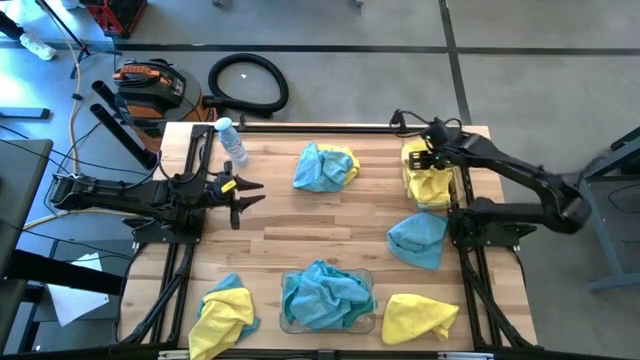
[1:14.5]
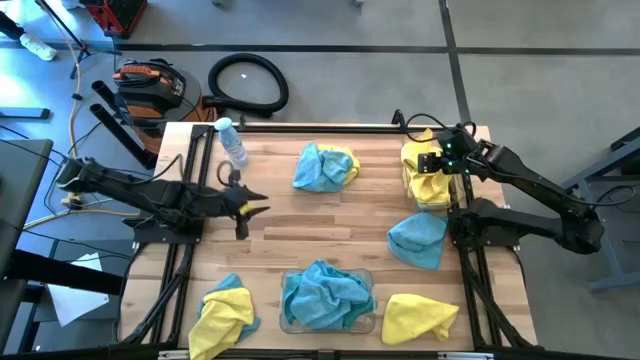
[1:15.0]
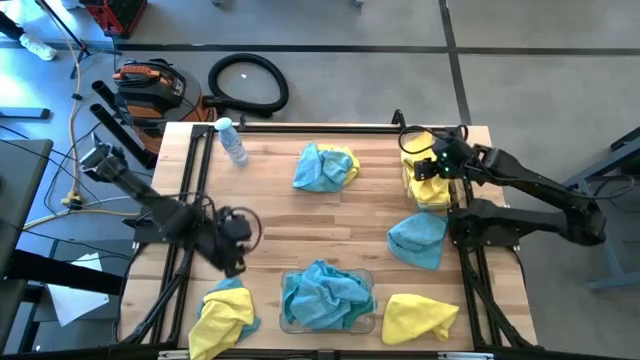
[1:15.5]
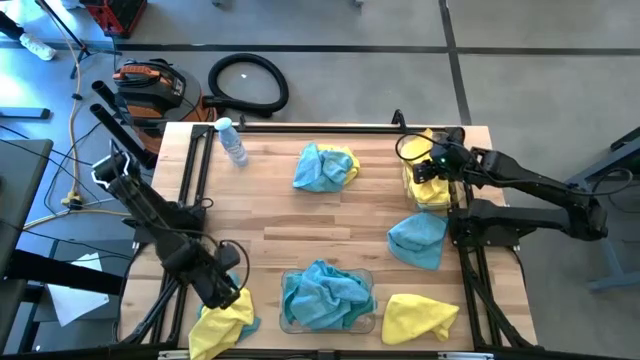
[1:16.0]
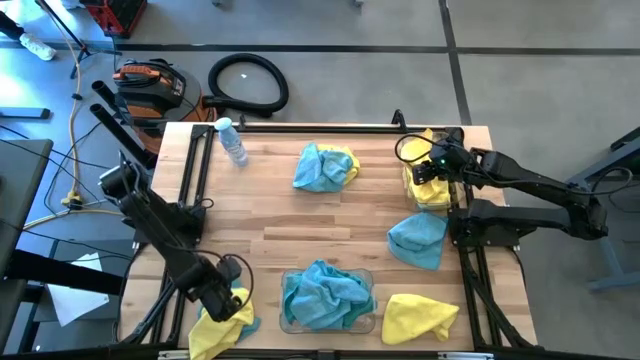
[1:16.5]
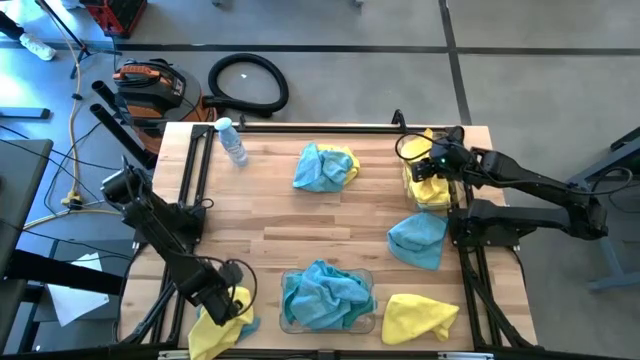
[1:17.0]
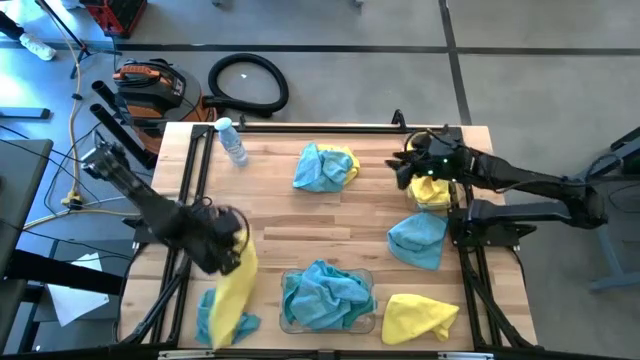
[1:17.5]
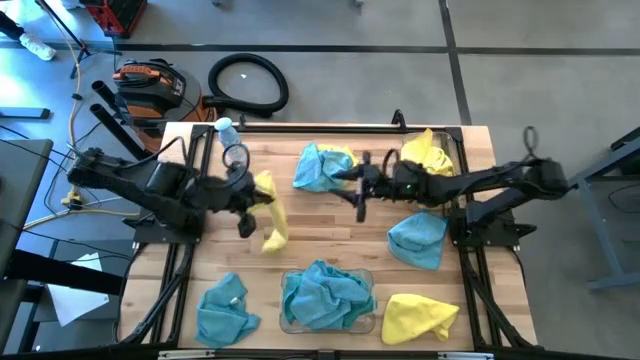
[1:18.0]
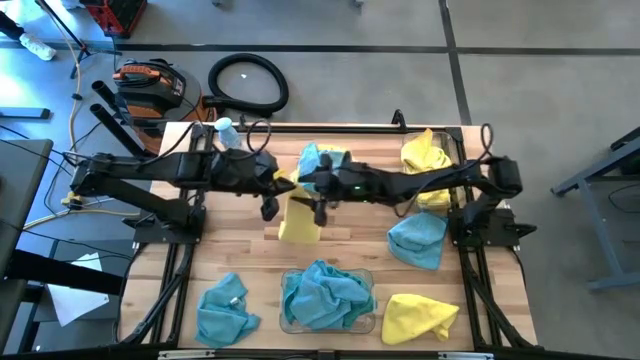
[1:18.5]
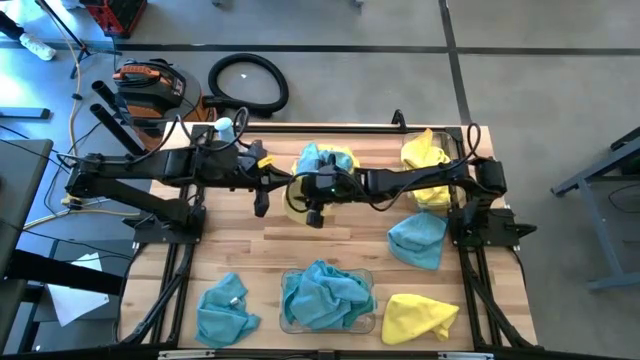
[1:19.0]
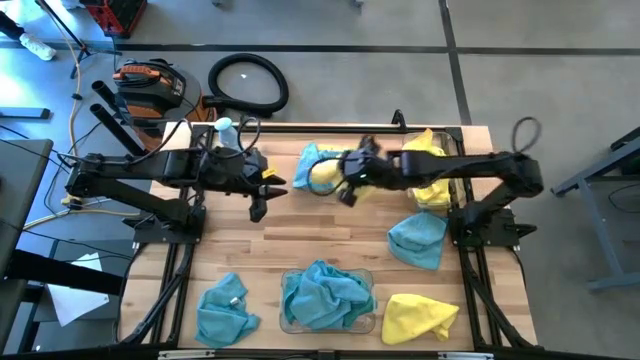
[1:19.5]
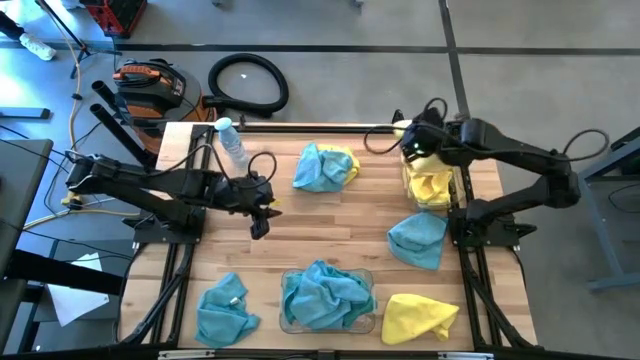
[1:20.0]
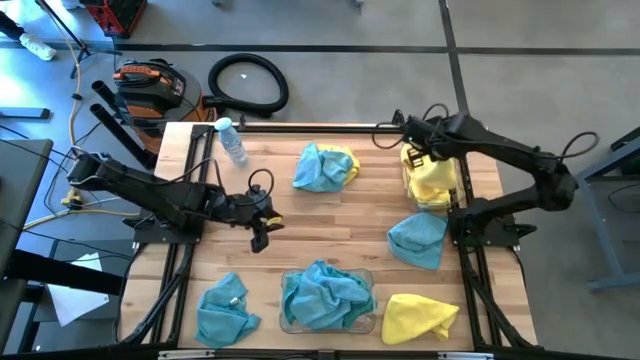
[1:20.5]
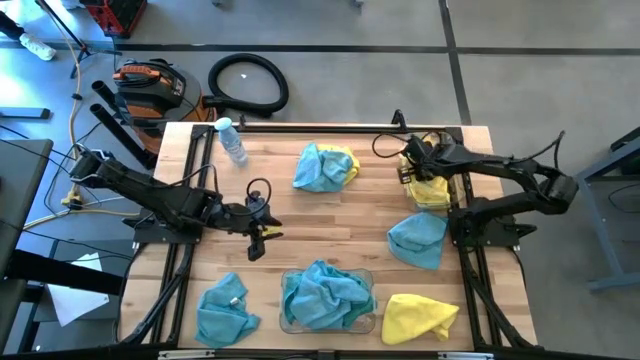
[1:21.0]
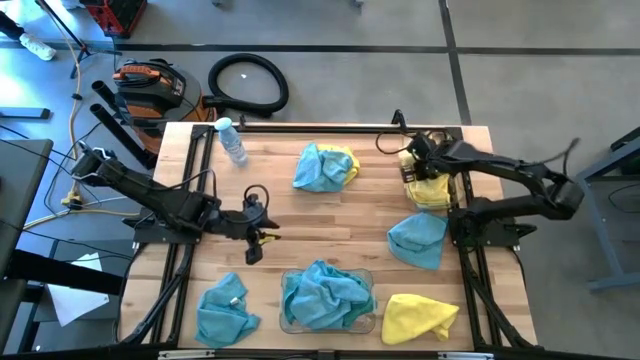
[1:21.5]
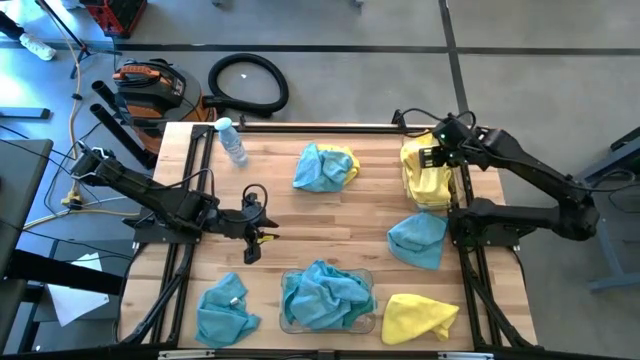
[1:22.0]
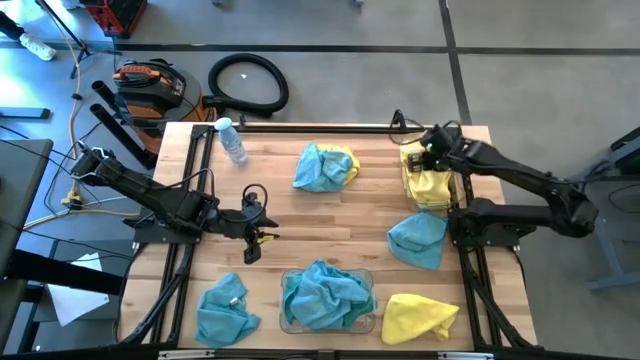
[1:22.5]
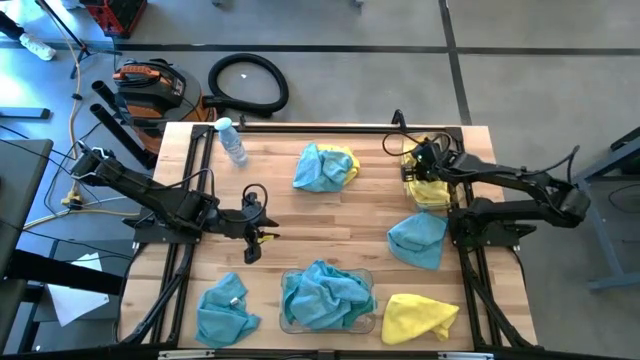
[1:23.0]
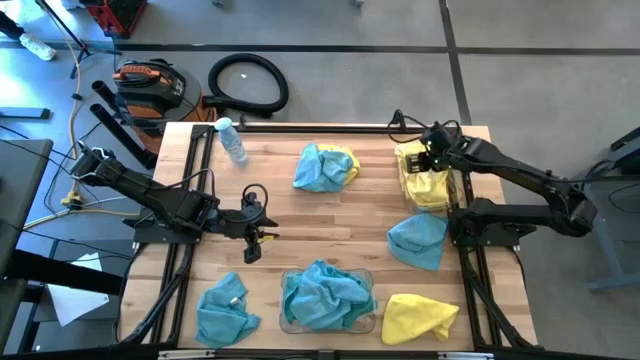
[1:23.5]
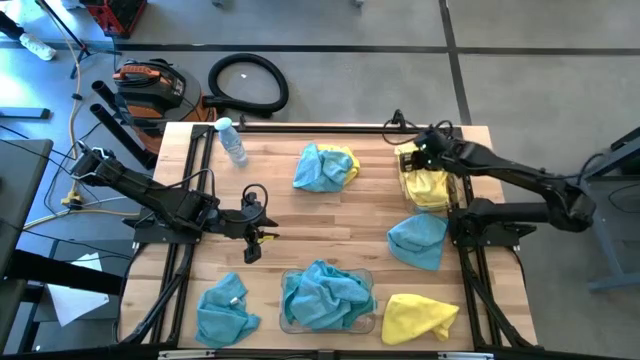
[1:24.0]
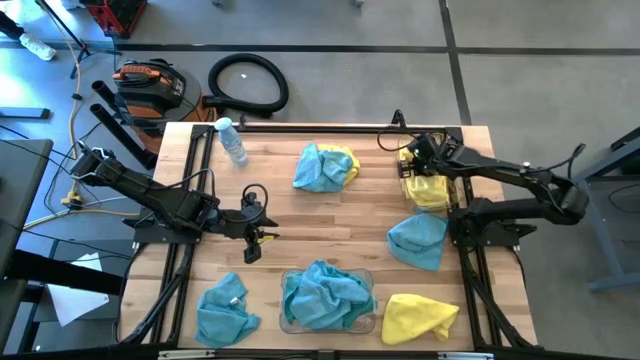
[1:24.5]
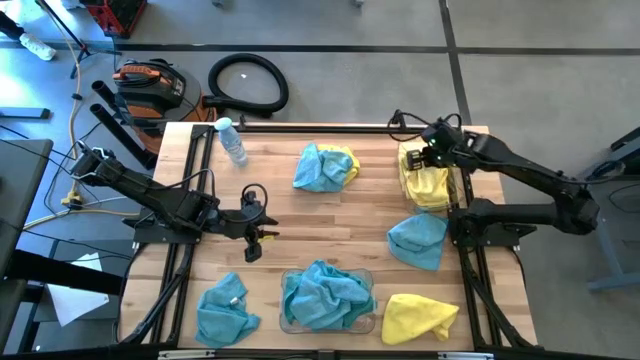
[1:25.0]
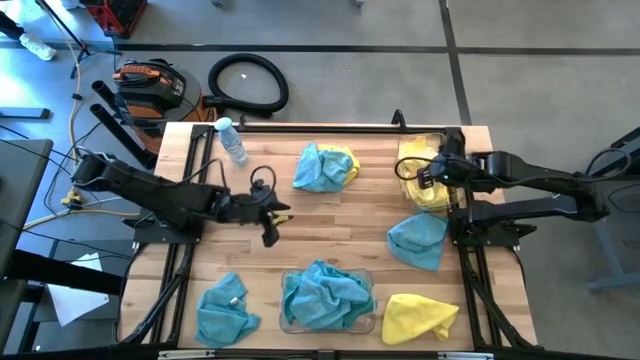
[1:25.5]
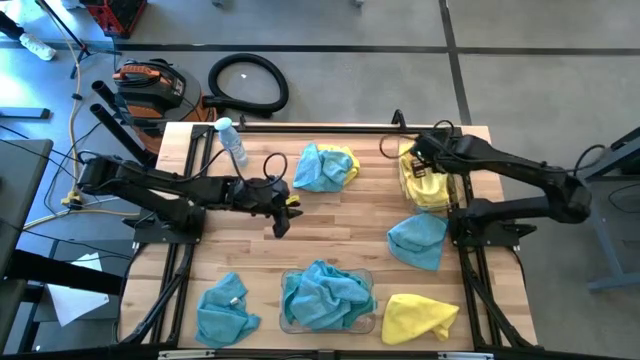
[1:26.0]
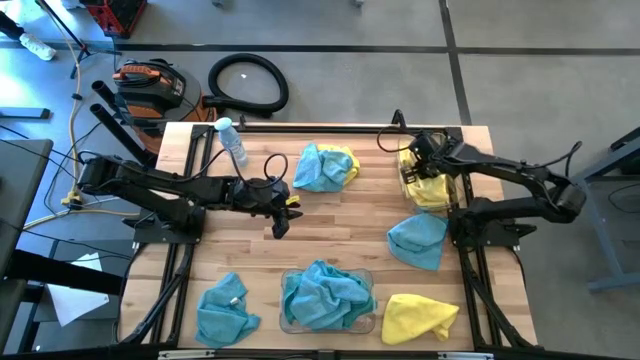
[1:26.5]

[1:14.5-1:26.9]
Task: Sort microfiber towel by color & place in baskets
Put the yellow microfiber towel into the top transparent bin

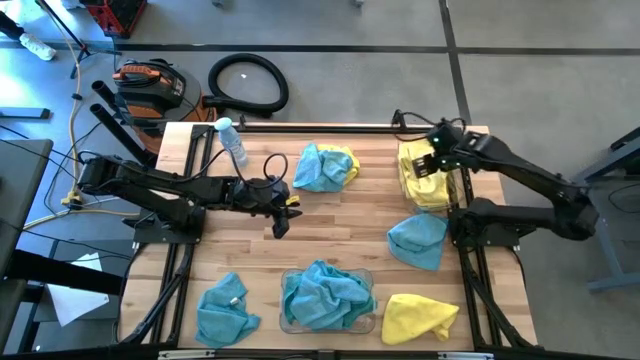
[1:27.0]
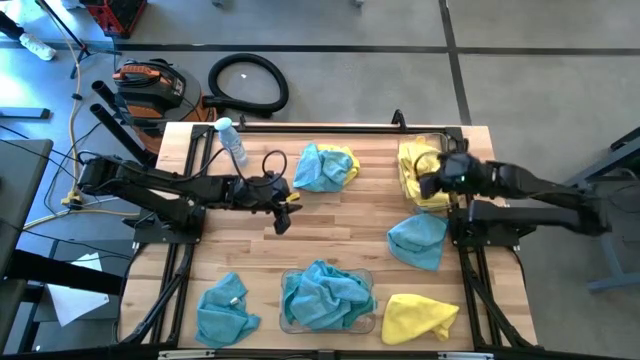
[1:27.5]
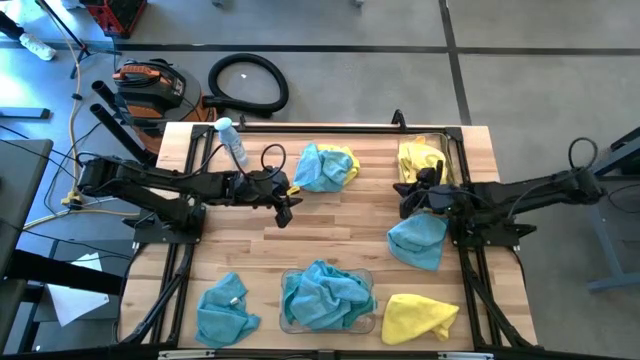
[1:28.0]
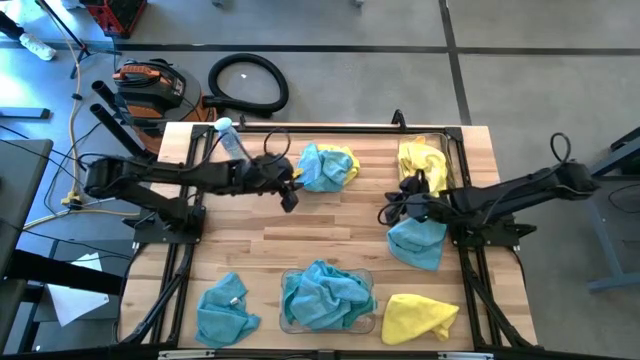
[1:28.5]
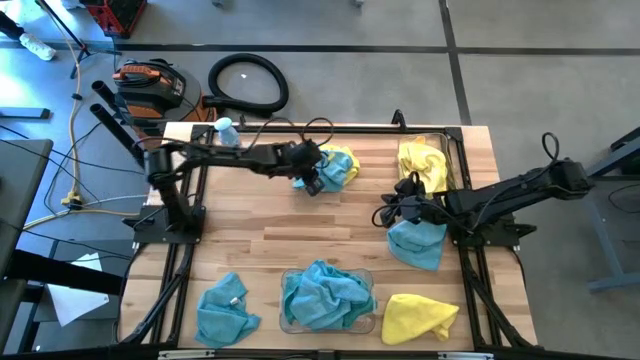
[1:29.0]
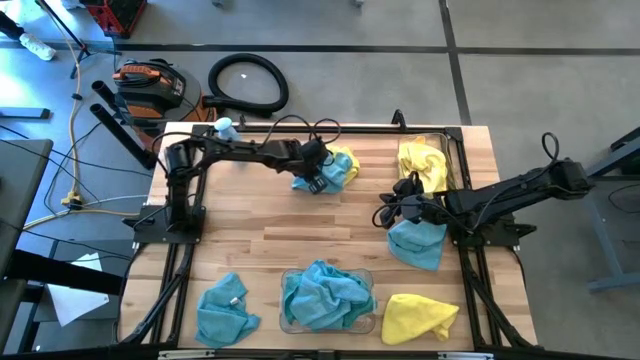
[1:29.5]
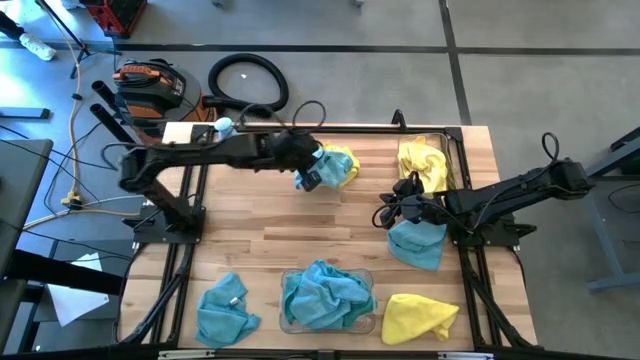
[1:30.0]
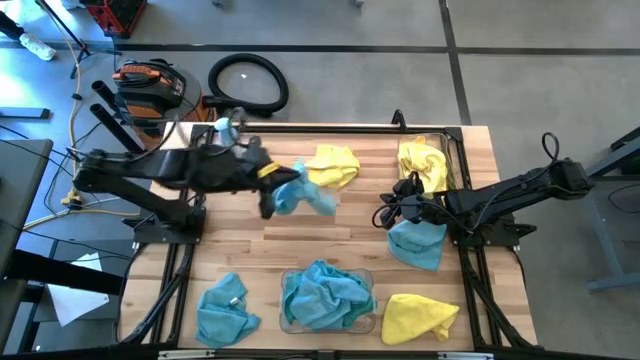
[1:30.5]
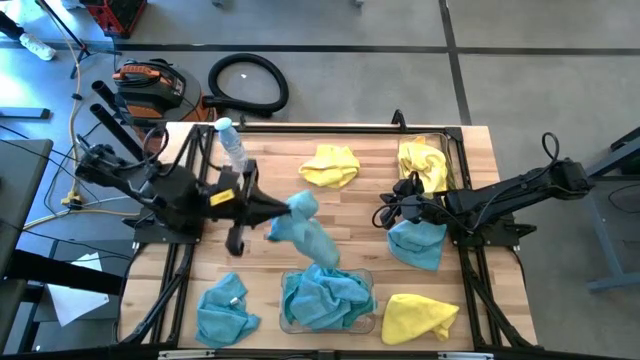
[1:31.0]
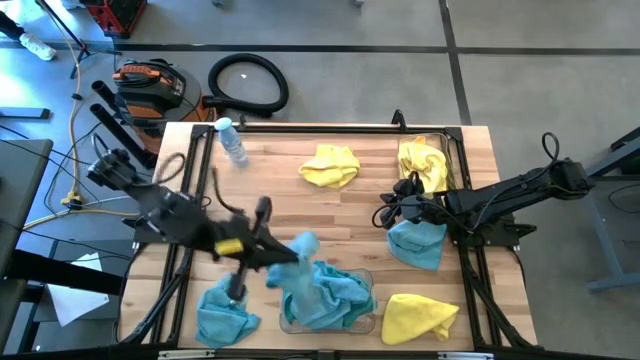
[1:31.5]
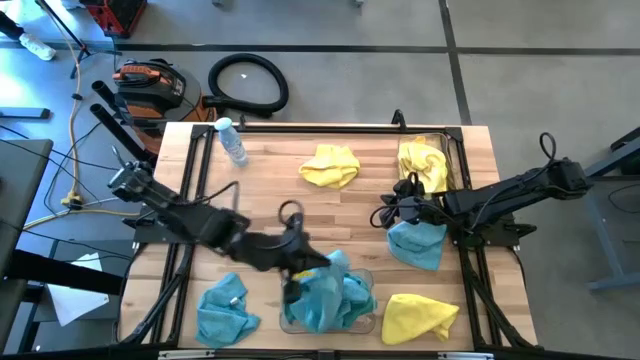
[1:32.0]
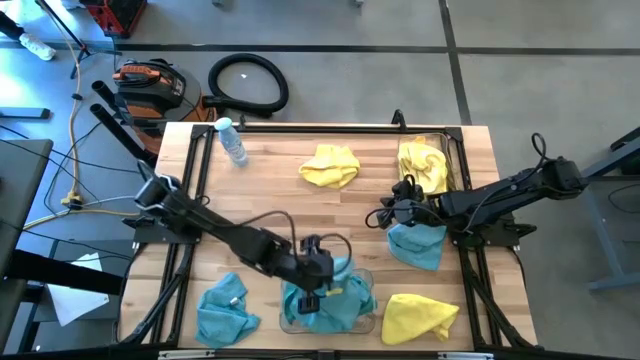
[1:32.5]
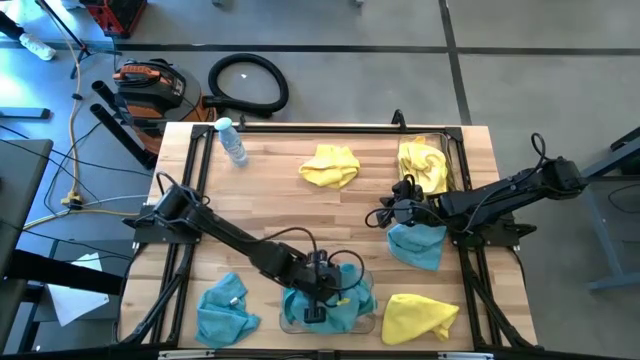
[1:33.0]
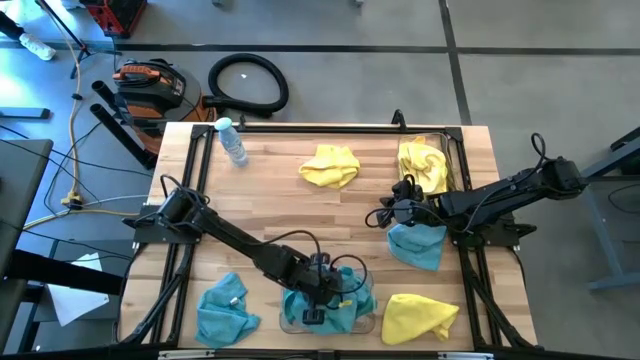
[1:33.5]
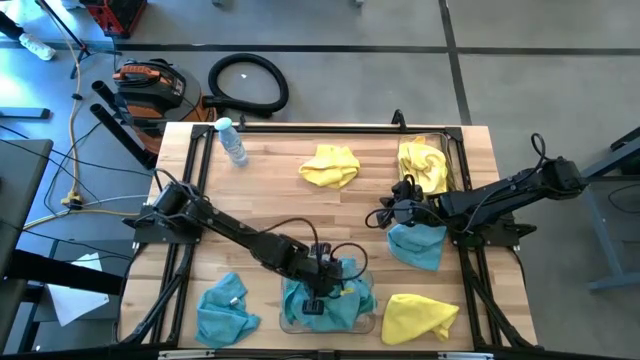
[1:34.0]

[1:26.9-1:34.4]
Put the blue microfiber towel into the bottom transparent bin

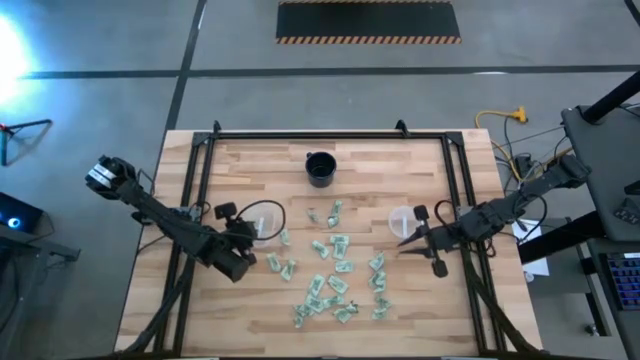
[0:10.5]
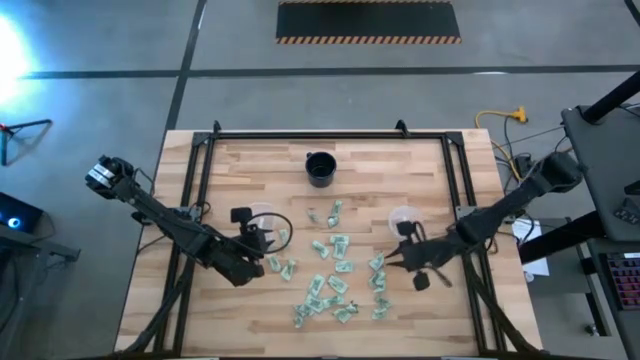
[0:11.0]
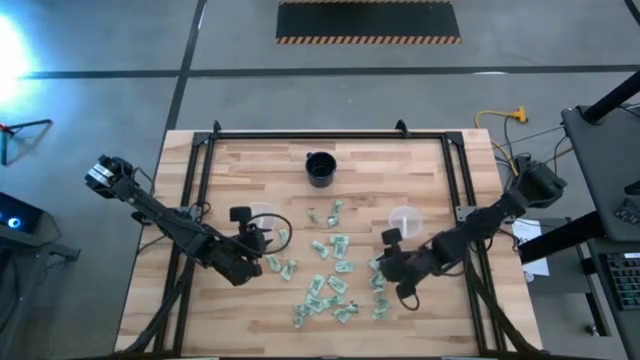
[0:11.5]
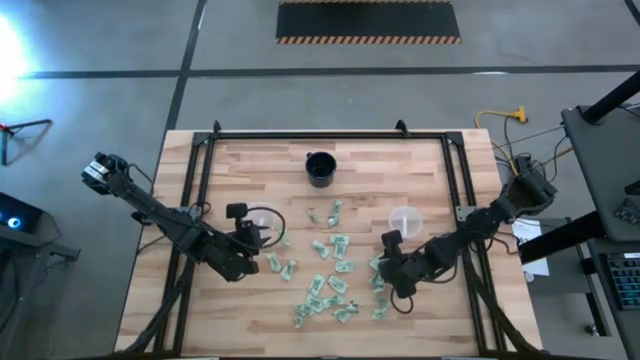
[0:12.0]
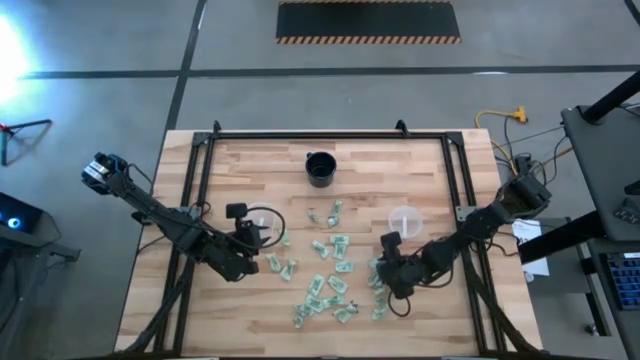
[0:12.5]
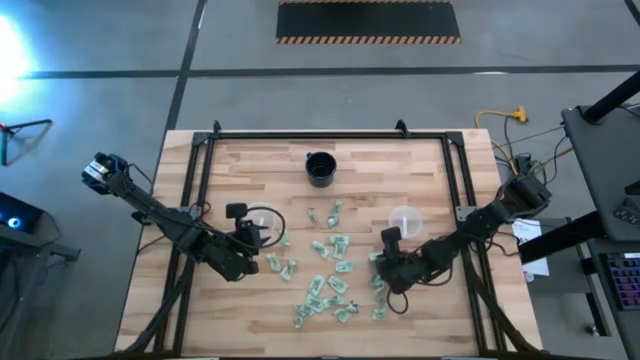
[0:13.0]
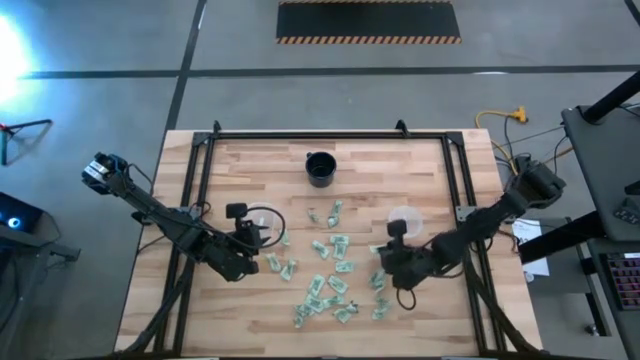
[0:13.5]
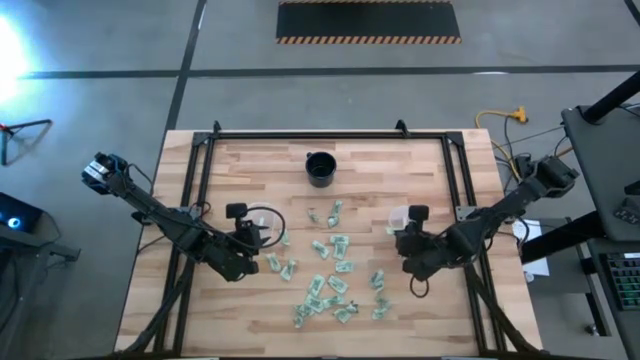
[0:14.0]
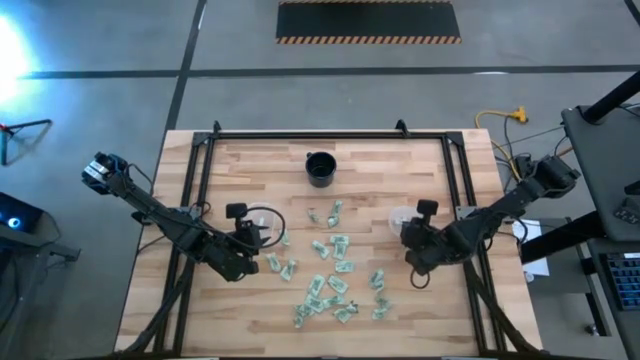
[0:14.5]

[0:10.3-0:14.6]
Task: Pick and place Stevia / Truvia into bins
Put the light green stevia packet into the circular container
